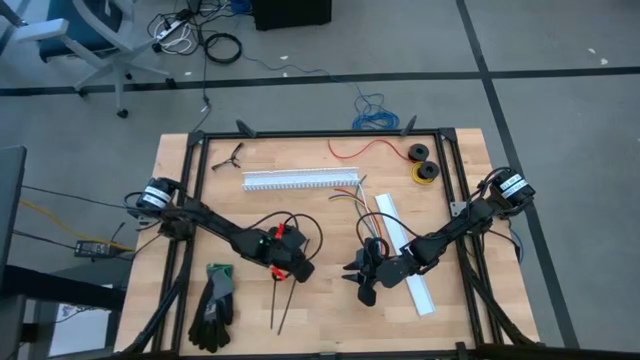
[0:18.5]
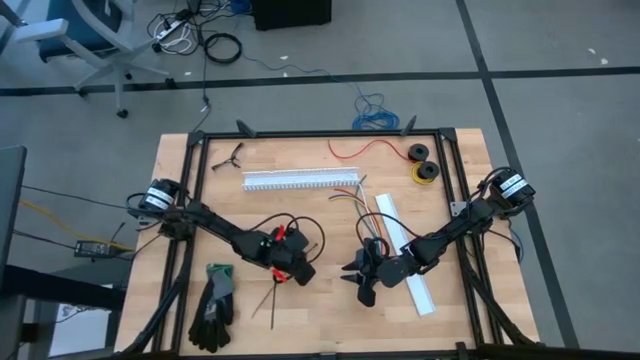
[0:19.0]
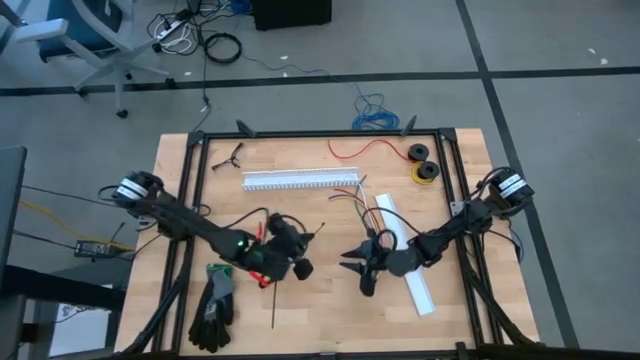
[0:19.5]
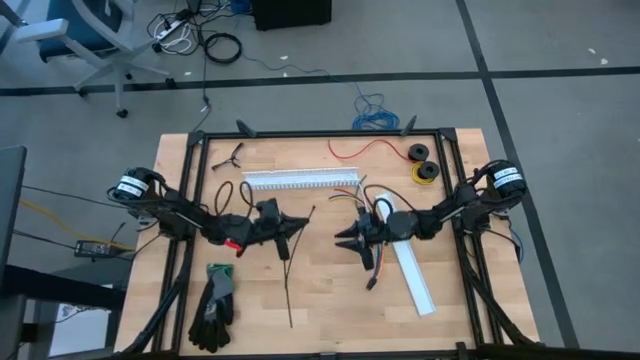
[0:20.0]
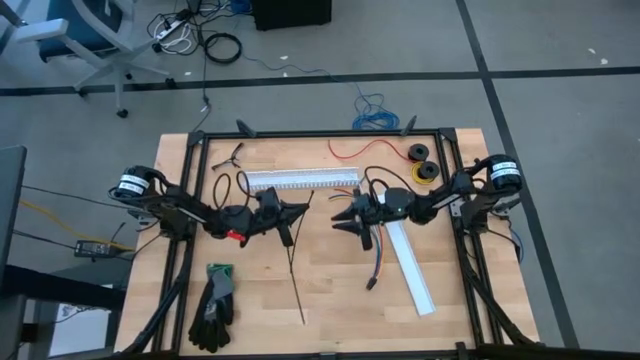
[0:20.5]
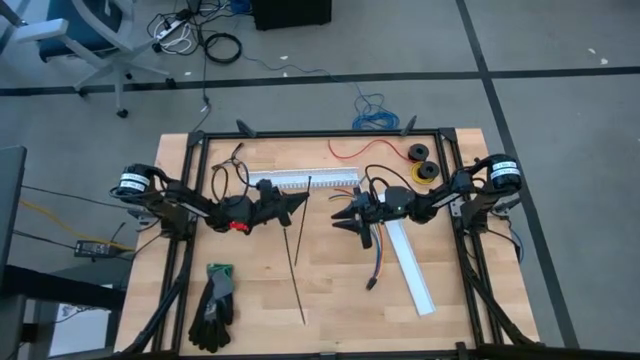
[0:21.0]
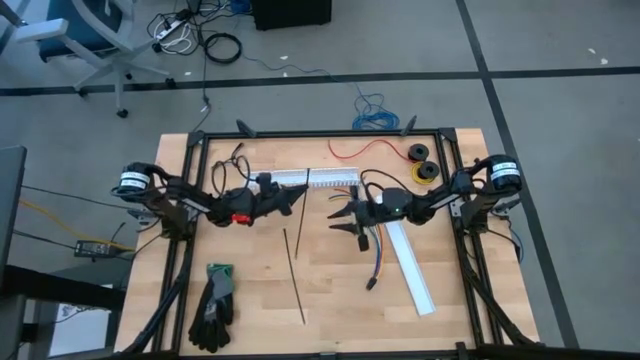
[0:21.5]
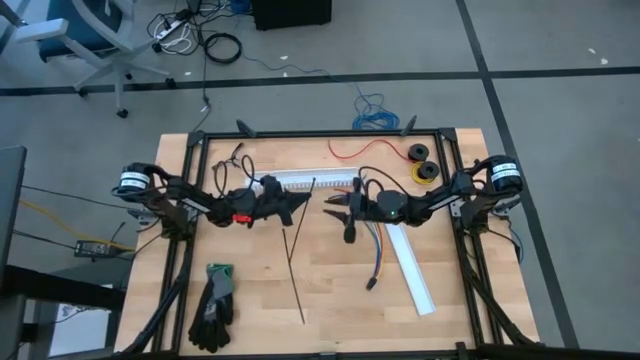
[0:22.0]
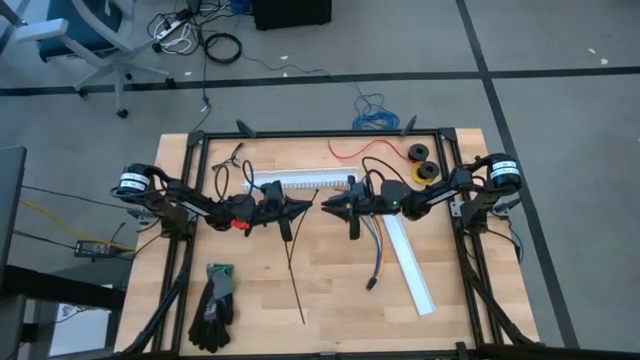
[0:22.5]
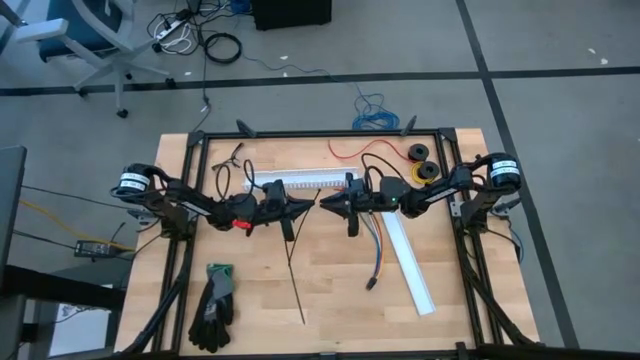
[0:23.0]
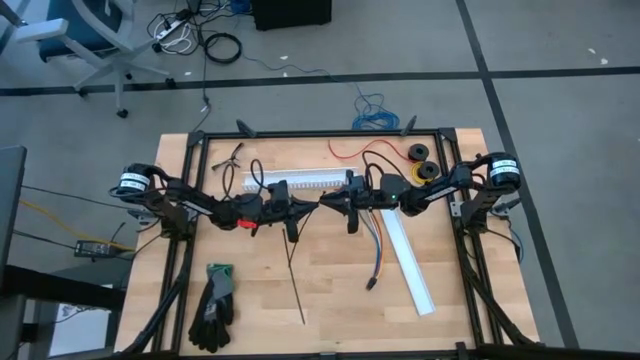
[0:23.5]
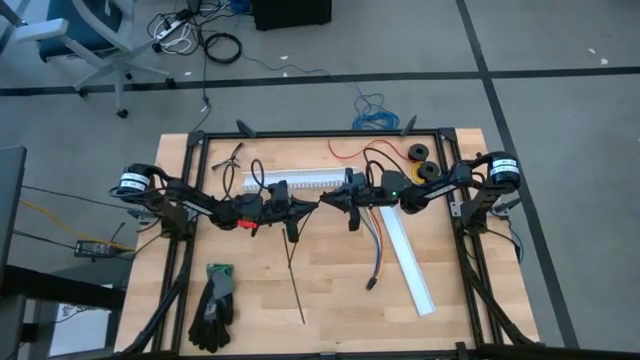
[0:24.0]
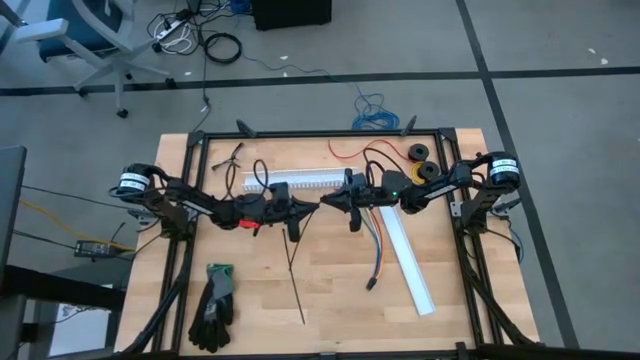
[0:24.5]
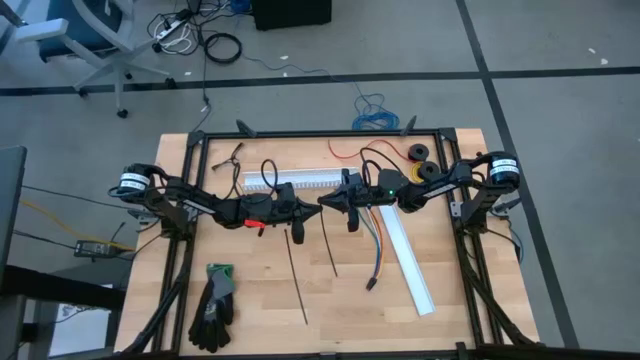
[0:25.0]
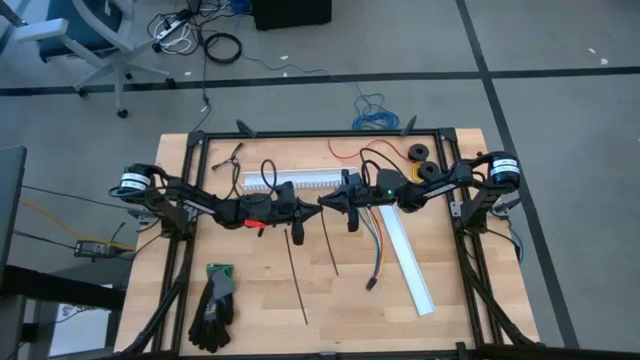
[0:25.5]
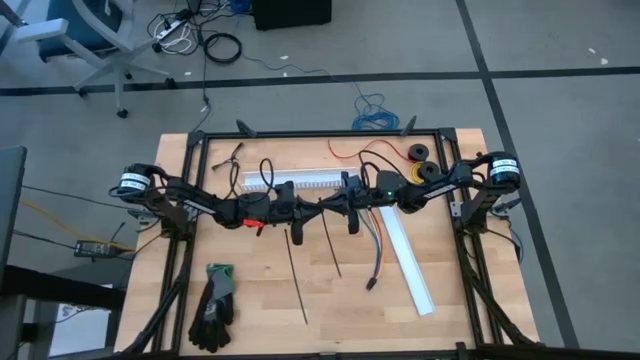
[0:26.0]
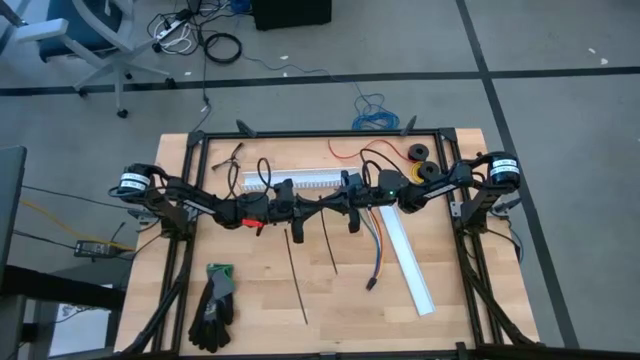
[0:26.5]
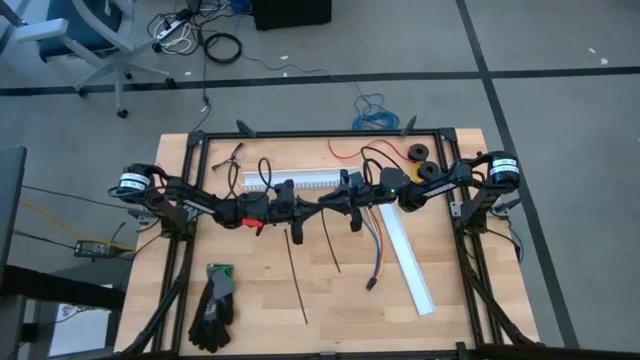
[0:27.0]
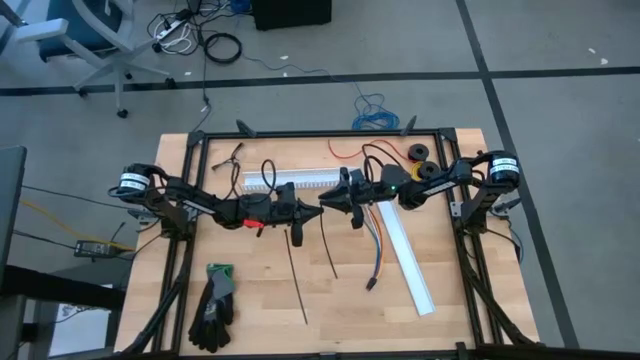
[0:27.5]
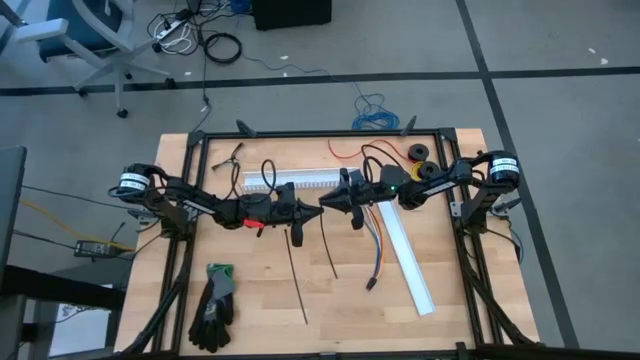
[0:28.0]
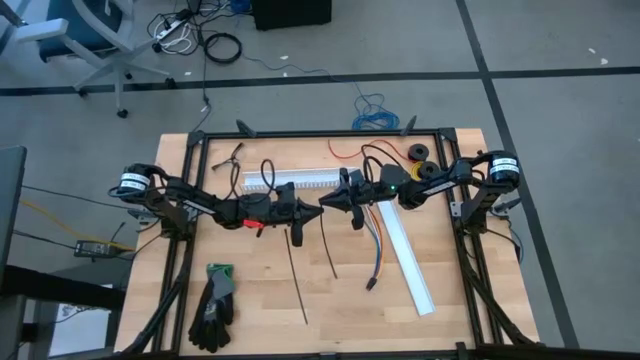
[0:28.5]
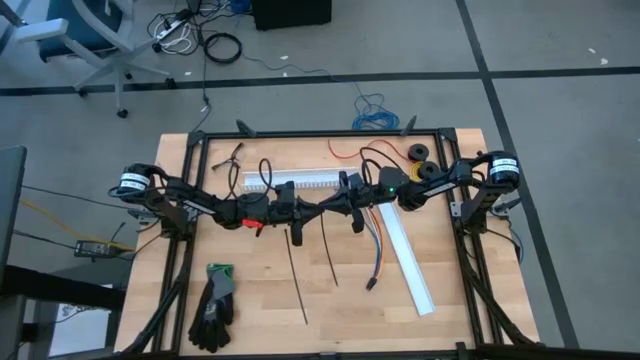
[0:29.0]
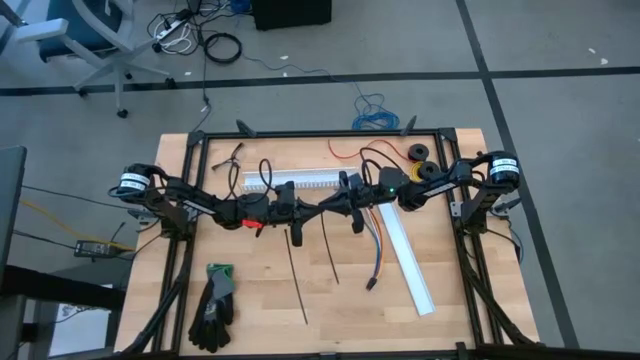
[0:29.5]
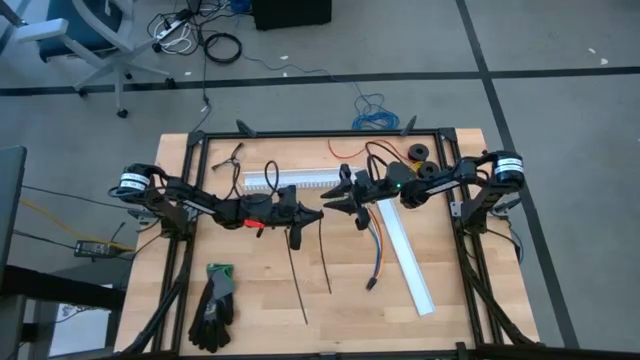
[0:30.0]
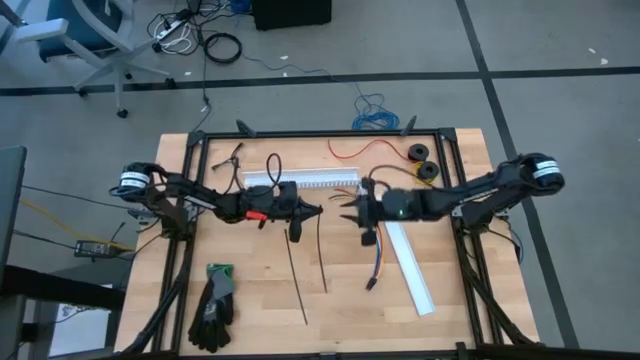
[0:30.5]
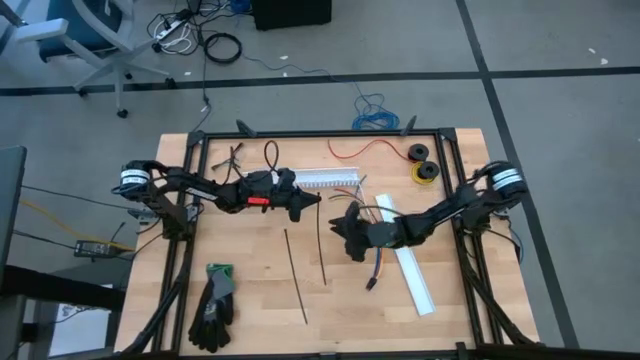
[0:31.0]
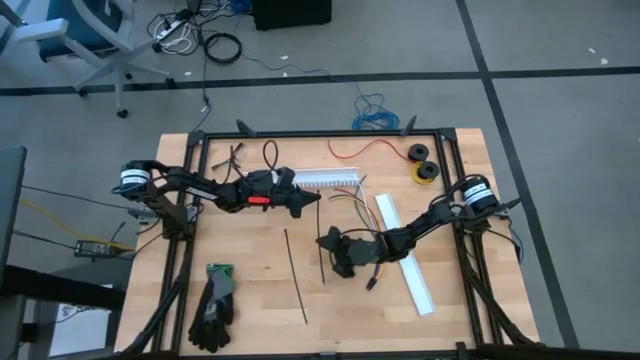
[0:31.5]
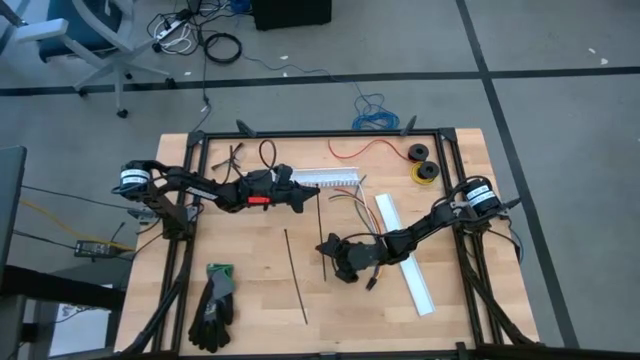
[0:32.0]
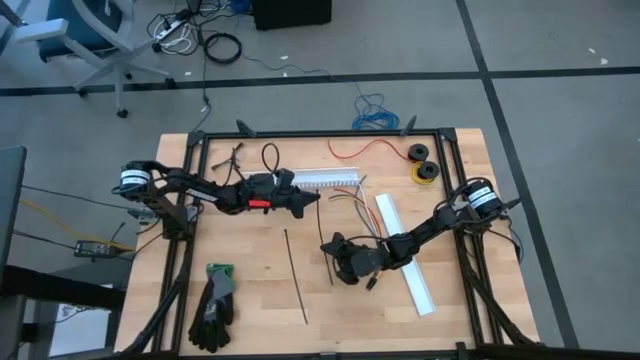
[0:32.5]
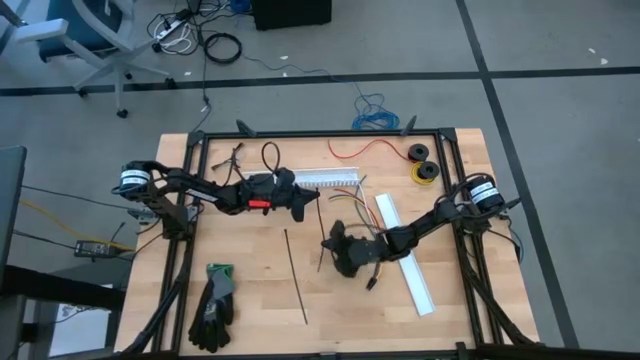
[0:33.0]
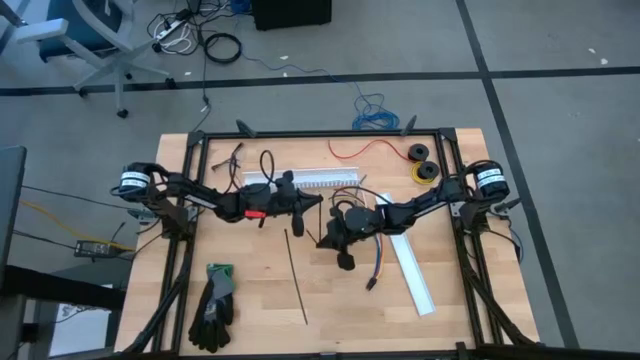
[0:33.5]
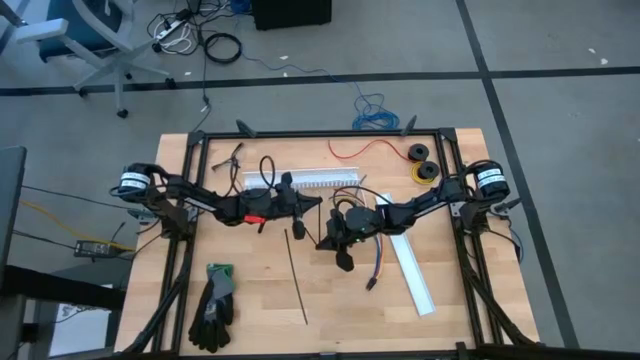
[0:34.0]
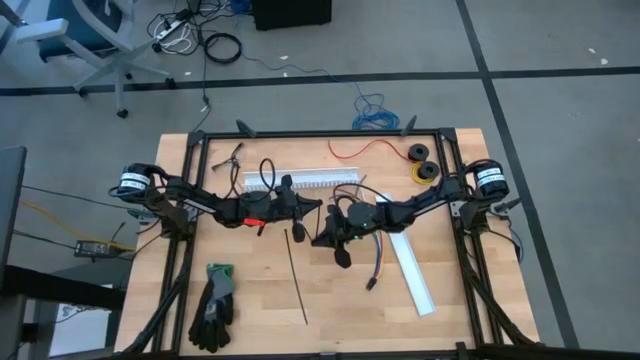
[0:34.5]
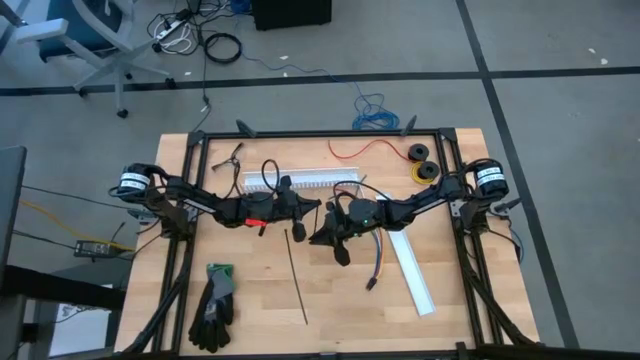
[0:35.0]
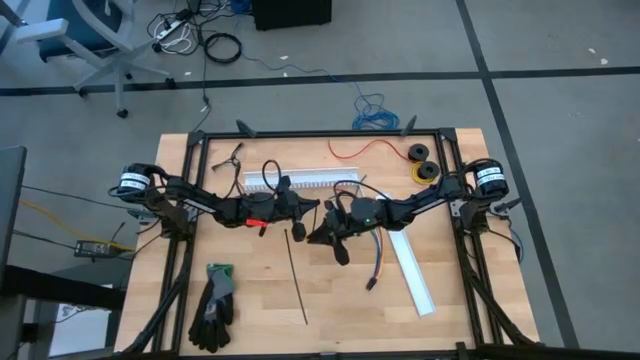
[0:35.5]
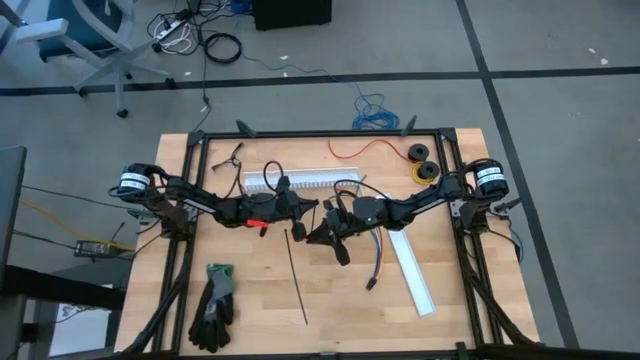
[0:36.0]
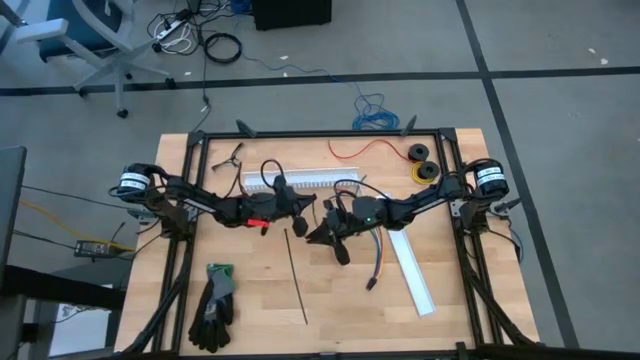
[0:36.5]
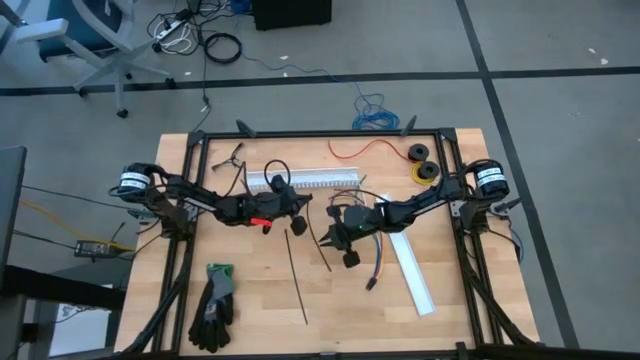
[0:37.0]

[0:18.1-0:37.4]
Task: Ziptie cables
Prepare the black zip tie

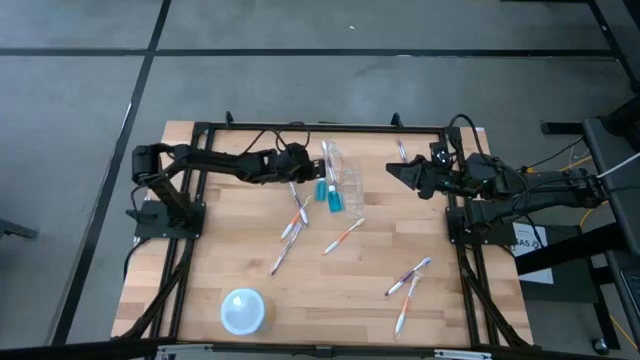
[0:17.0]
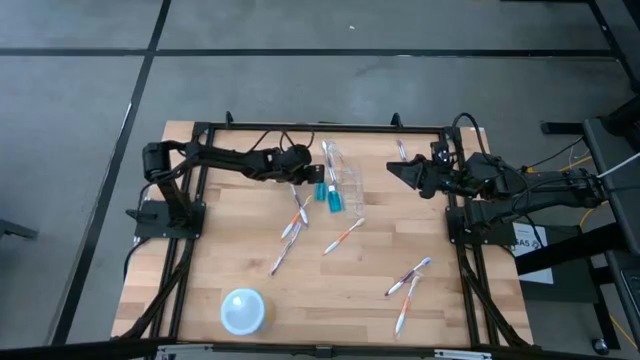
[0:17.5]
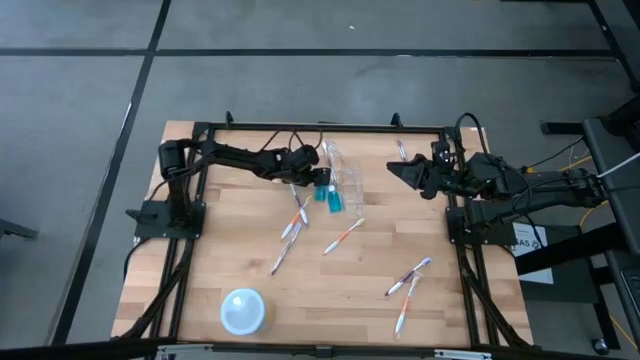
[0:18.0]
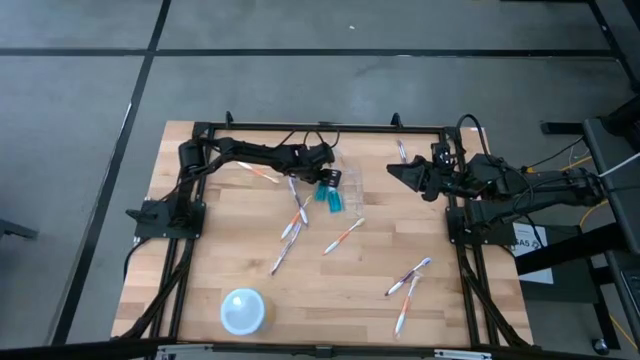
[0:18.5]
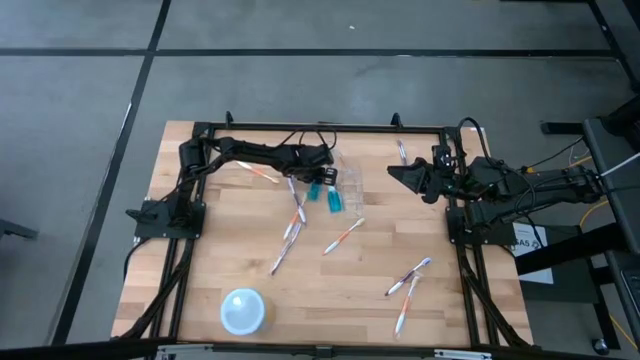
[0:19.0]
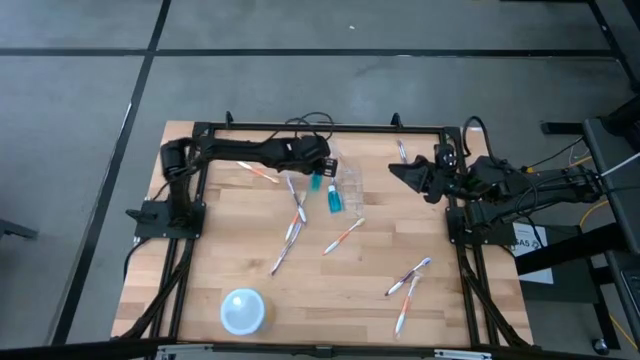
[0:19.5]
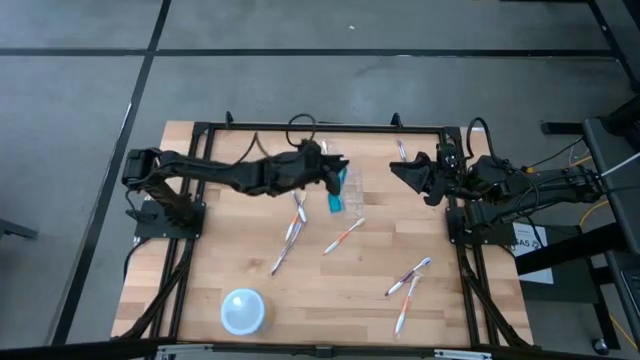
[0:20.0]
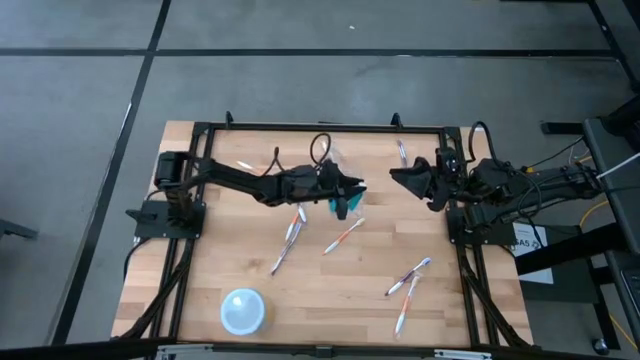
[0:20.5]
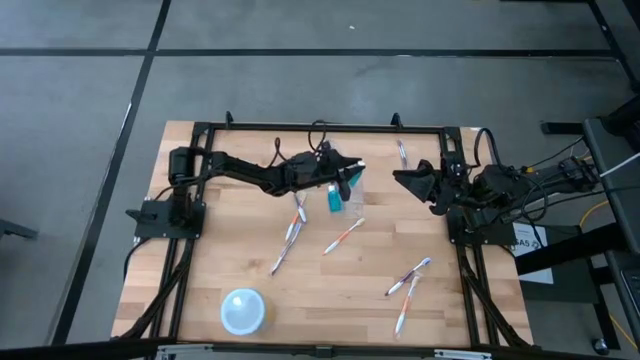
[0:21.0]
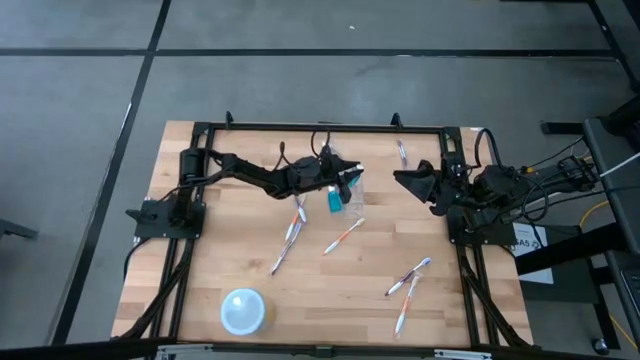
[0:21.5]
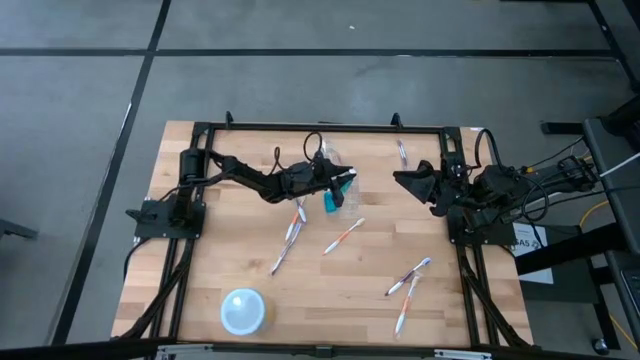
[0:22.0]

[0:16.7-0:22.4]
Task: Pick & Place toothbrushing station
Put the blue mouthwash bottle into the transparent organizer
